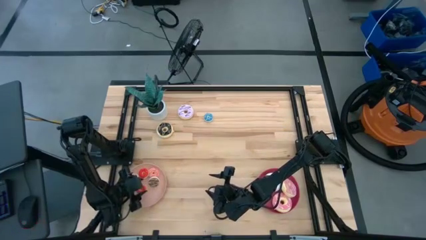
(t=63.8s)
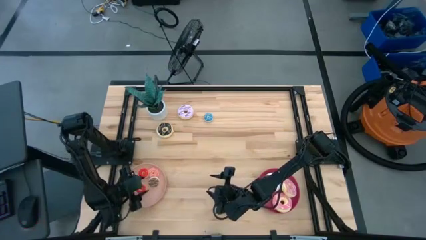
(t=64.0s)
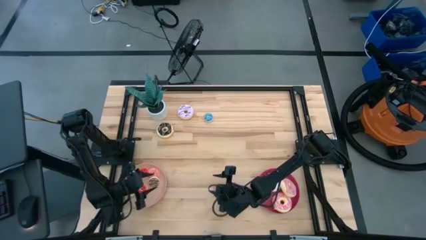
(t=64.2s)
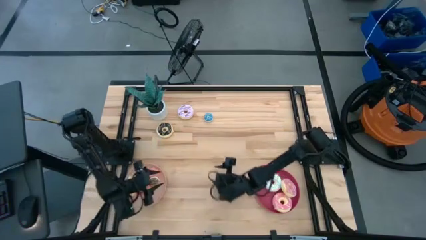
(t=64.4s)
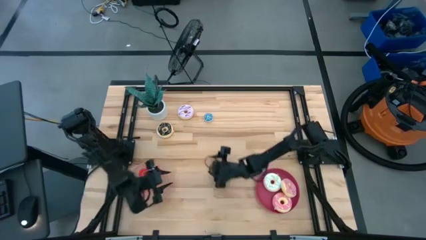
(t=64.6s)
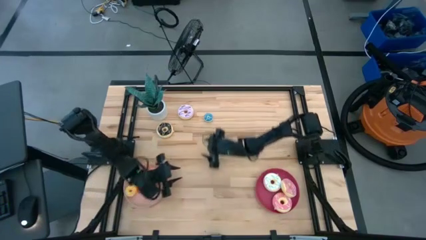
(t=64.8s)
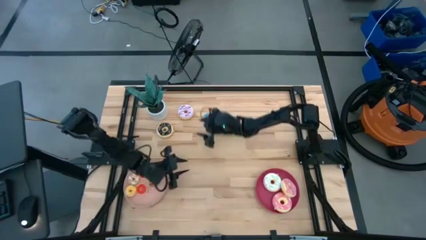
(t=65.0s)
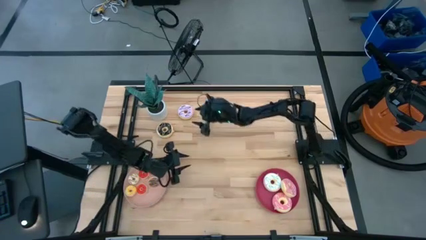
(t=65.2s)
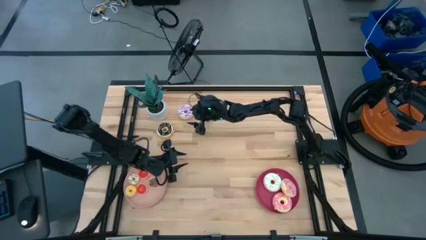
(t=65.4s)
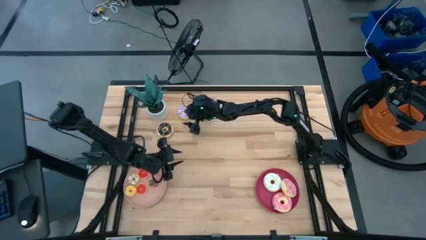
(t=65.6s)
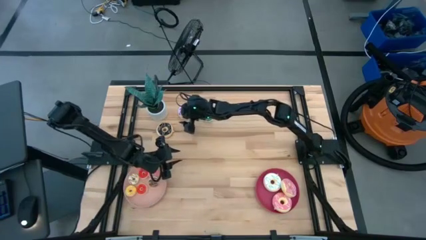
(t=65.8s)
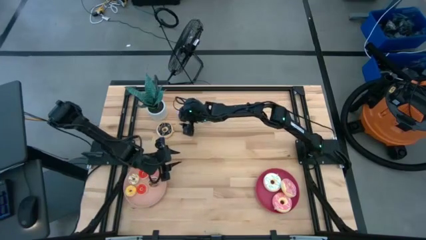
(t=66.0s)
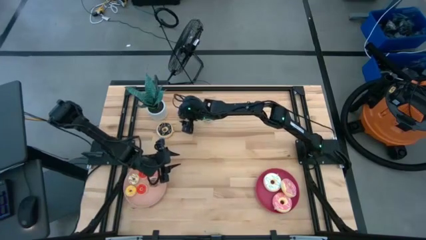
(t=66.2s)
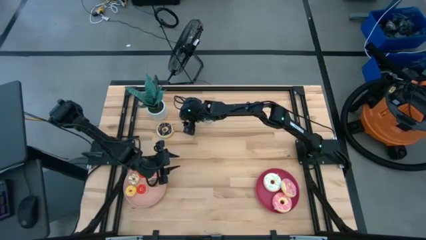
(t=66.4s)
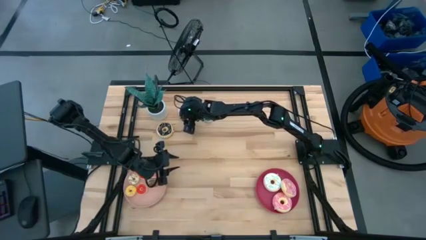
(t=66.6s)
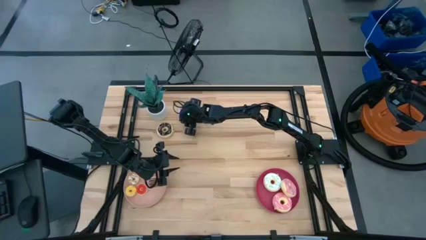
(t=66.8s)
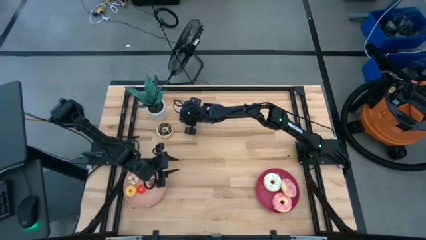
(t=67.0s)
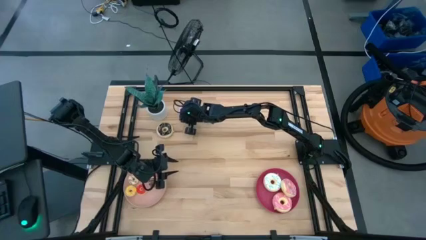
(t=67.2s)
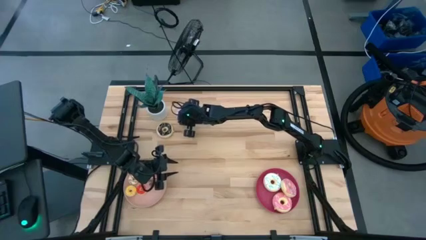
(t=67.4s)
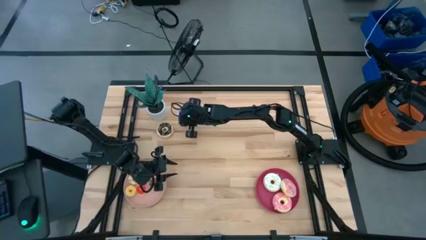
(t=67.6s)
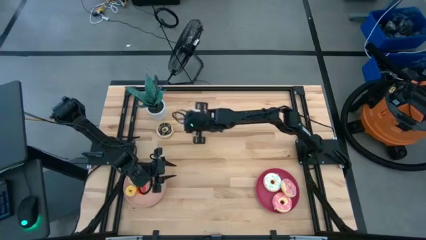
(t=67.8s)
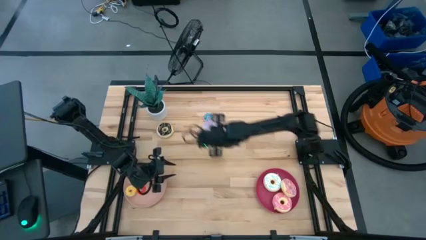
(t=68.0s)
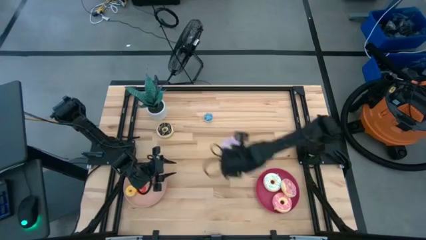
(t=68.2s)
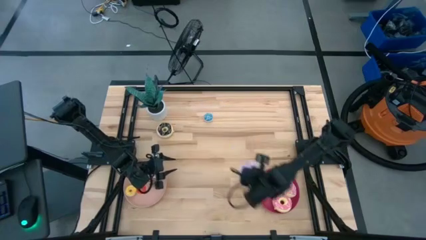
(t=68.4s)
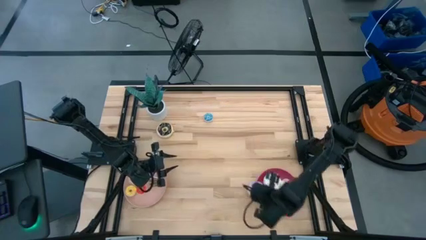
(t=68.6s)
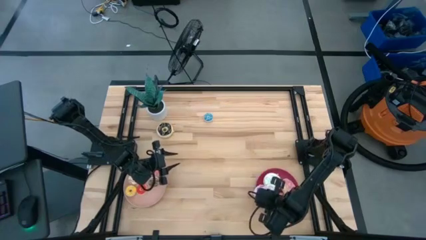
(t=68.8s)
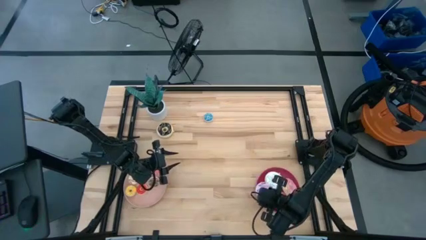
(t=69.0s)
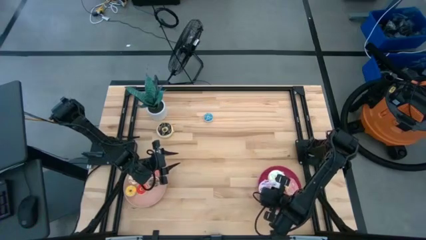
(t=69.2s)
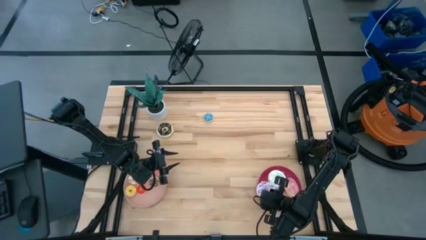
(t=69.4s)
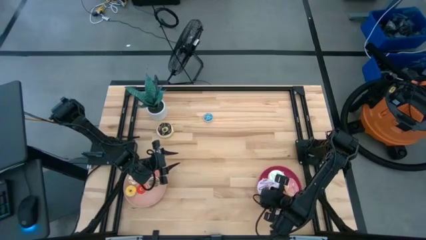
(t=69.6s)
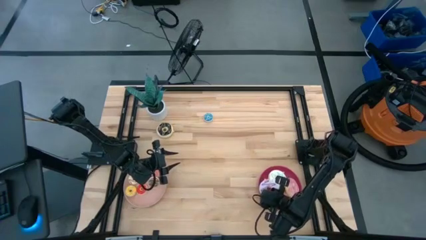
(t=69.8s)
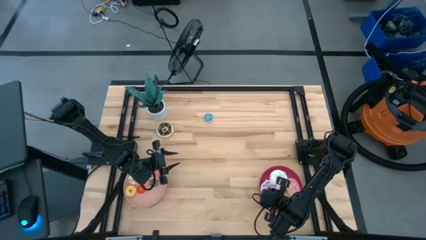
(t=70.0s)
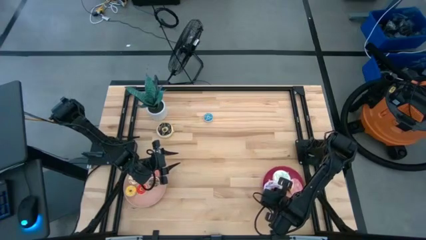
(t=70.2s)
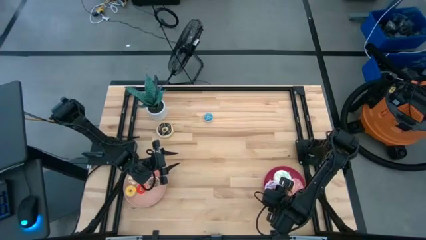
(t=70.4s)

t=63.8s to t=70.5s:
Task: Pick & Place donuts
Put the big purple donut on the dark pink plate

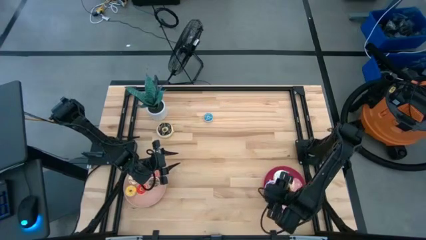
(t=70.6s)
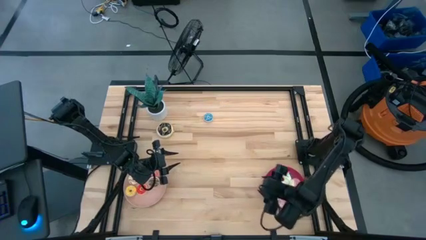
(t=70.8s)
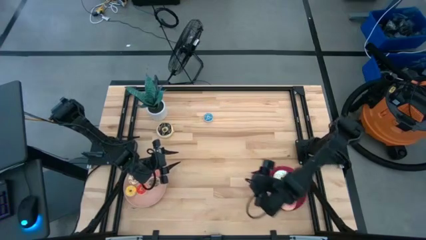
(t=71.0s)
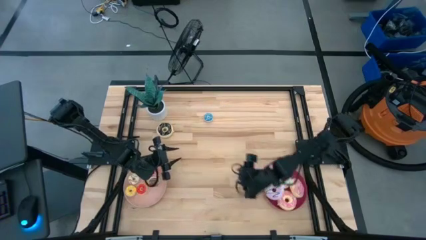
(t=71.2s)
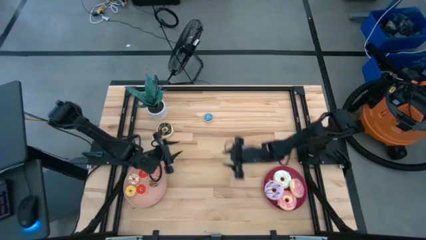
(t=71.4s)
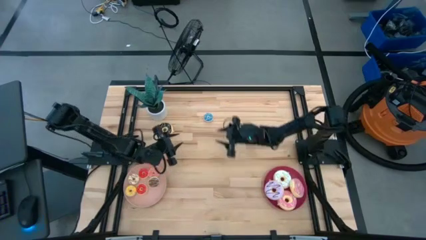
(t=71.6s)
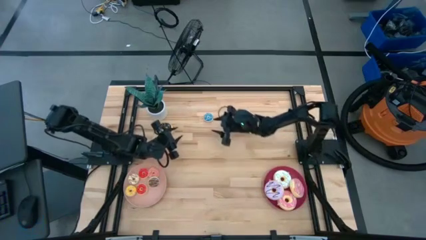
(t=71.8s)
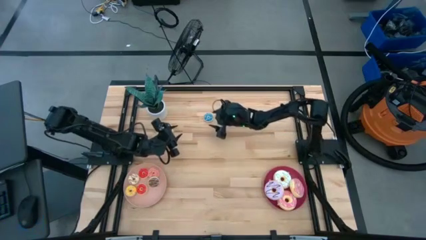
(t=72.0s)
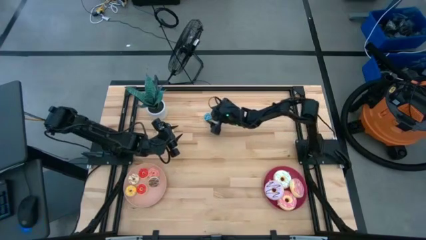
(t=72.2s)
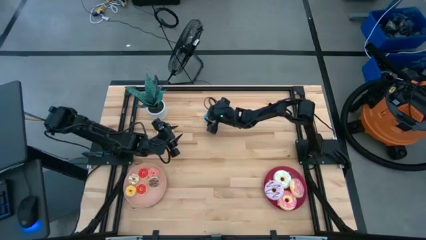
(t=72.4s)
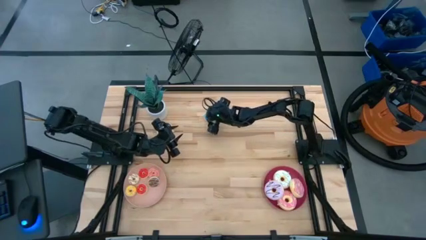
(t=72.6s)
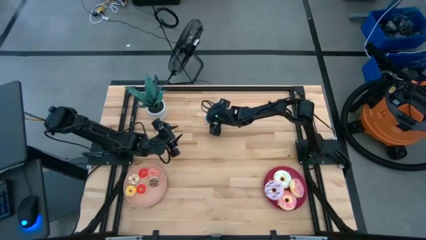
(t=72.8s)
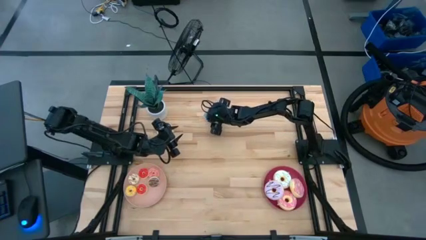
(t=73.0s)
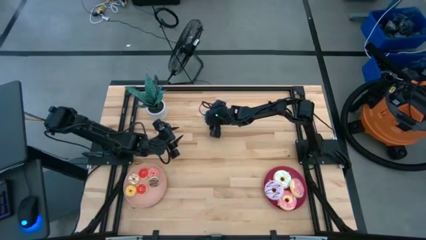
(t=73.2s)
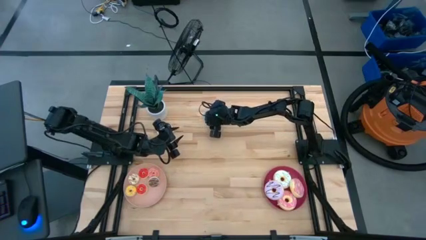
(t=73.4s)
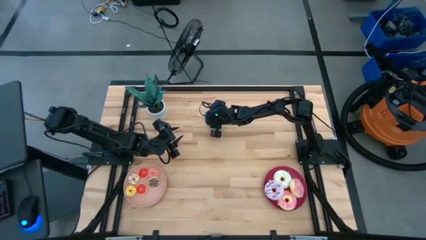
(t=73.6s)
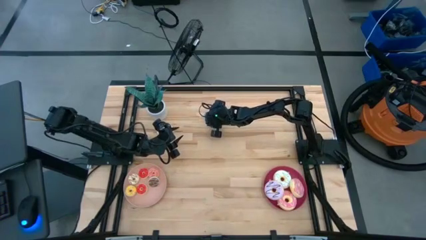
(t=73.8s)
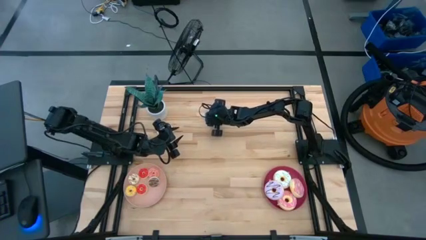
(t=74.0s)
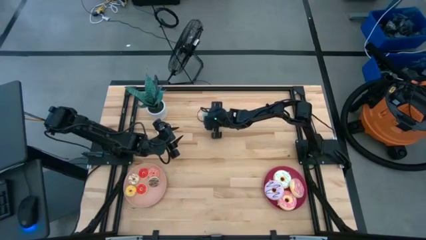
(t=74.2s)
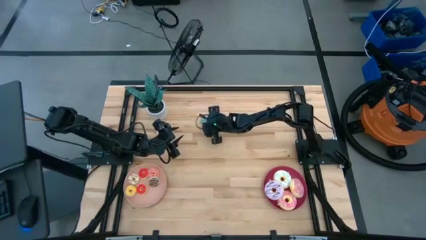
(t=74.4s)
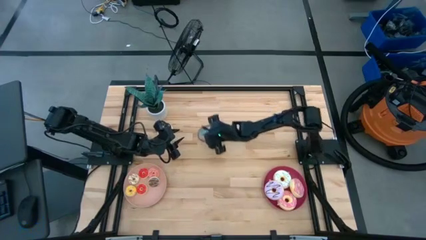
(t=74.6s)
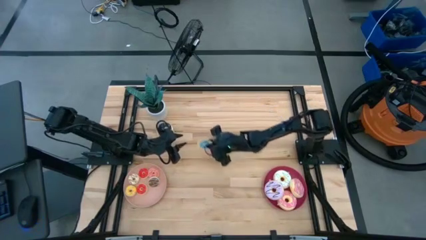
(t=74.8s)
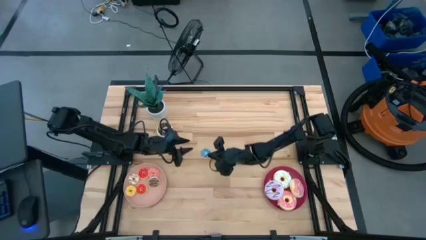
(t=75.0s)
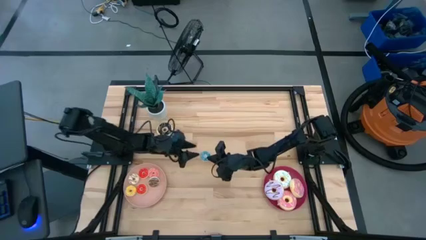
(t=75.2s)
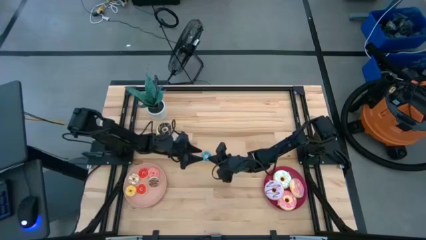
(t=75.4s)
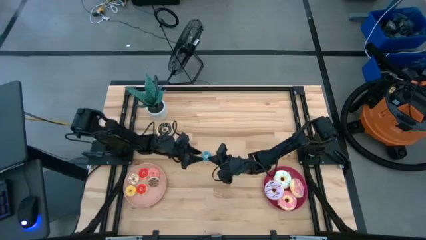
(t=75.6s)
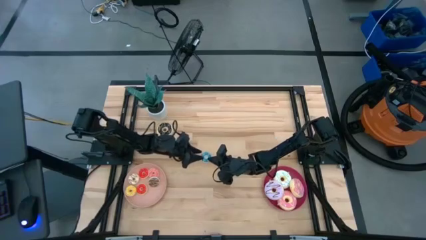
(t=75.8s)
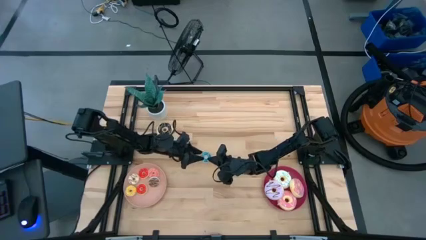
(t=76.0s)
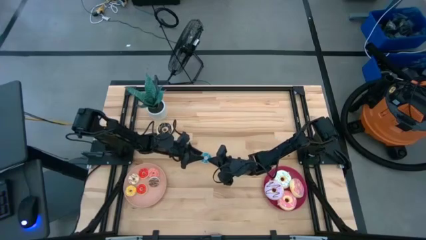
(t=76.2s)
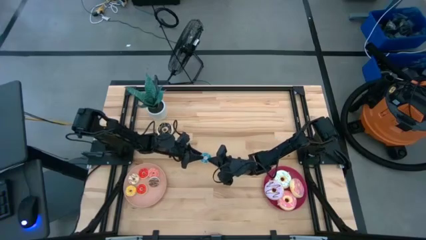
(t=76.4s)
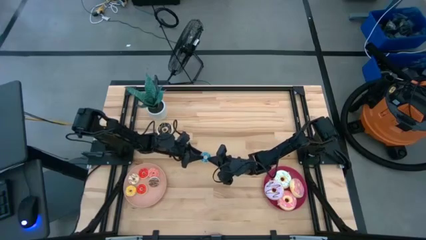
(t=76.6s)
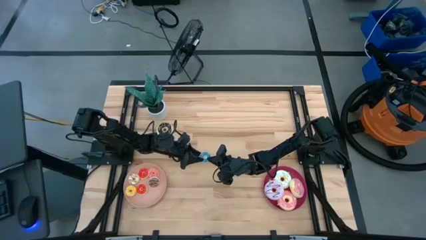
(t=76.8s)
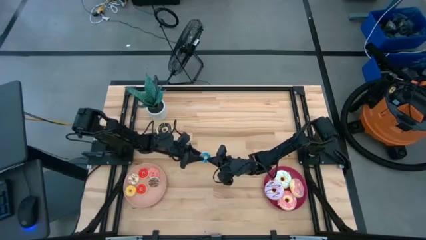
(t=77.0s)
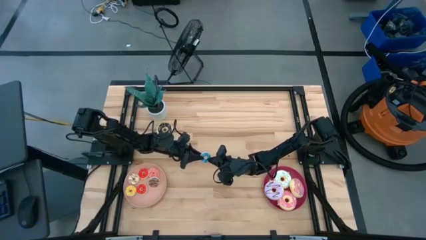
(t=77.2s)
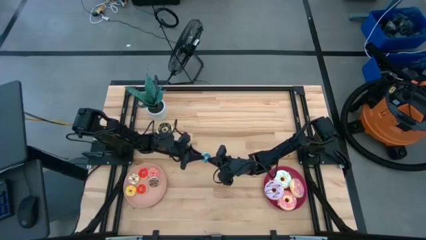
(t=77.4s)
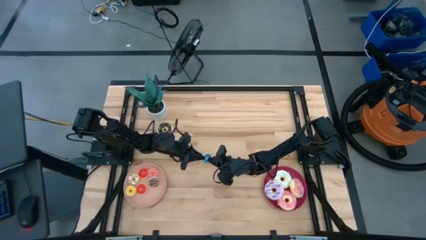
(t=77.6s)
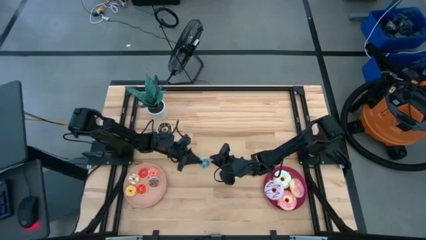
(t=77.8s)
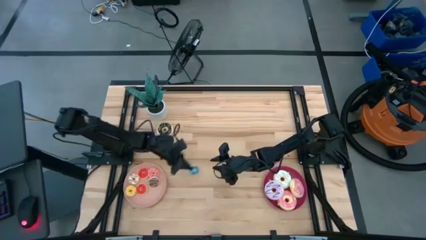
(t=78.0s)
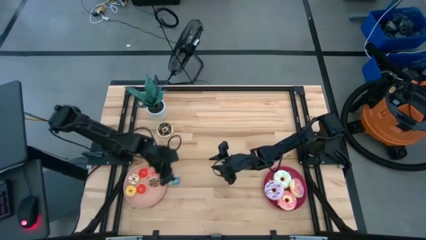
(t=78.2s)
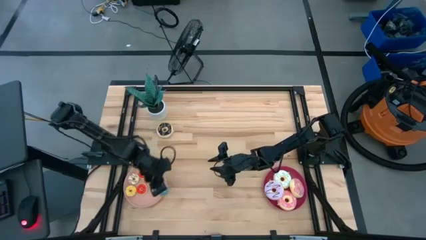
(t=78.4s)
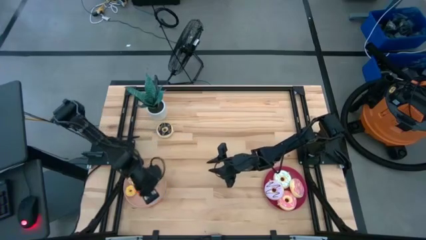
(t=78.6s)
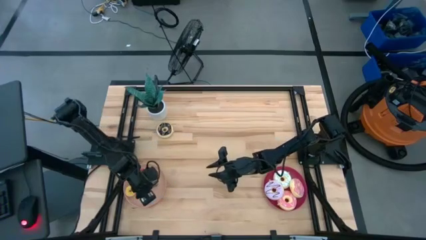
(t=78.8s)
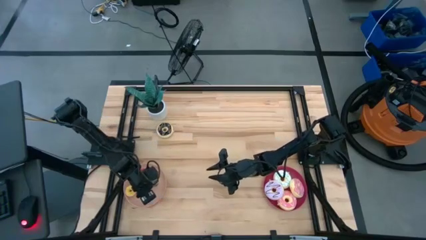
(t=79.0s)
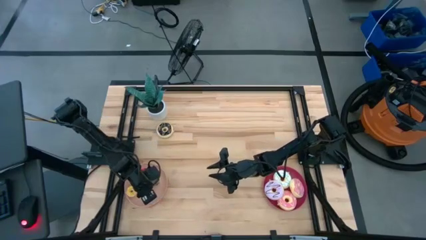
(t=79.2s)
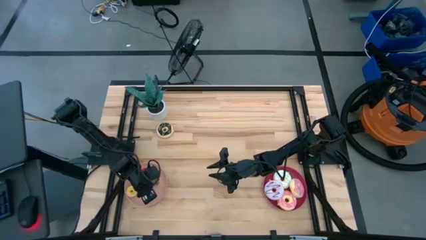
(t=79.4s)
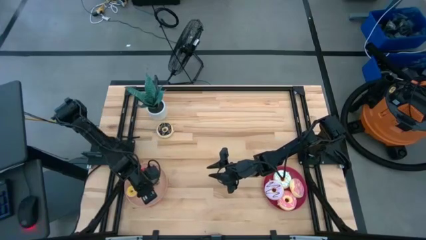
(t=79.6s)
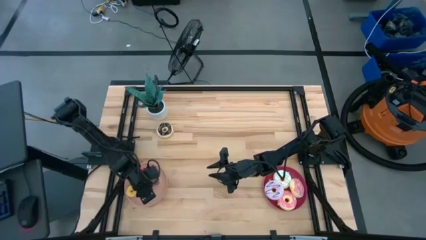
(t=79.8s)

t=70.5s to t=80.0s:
Put the small blue donut on the light pink plate

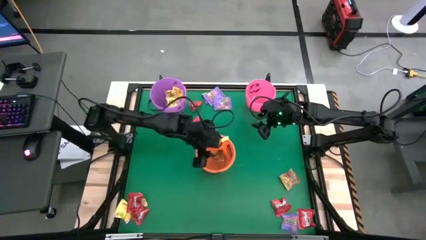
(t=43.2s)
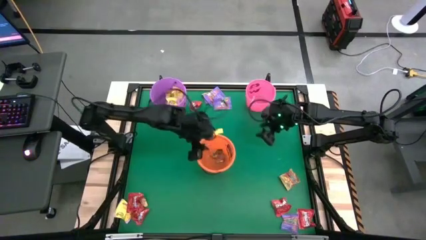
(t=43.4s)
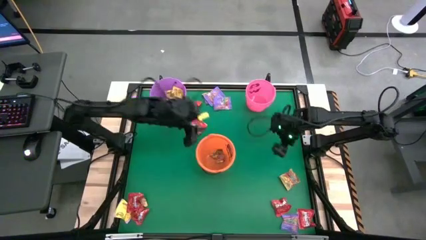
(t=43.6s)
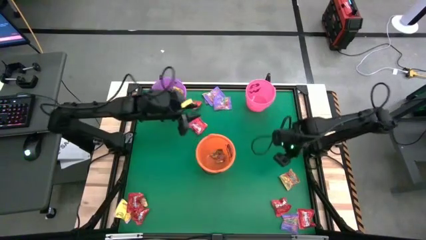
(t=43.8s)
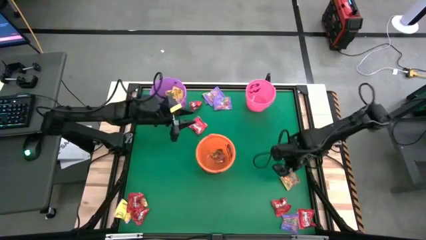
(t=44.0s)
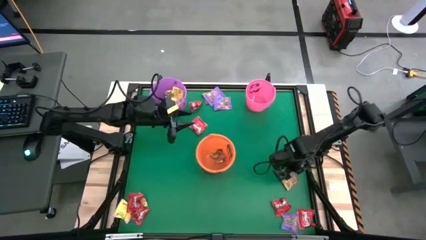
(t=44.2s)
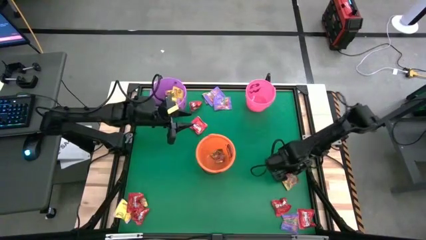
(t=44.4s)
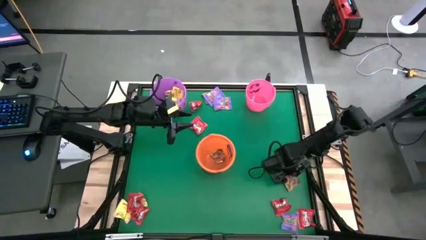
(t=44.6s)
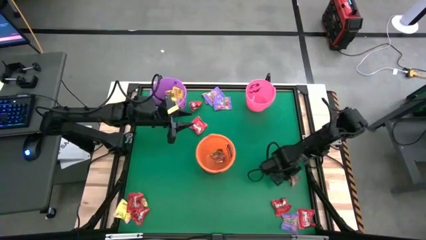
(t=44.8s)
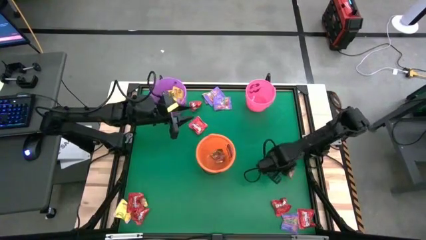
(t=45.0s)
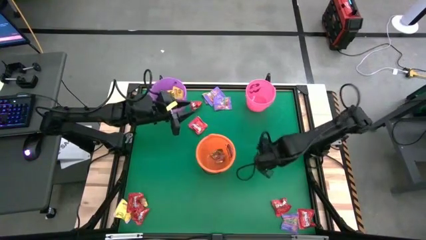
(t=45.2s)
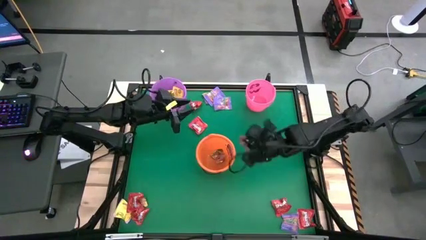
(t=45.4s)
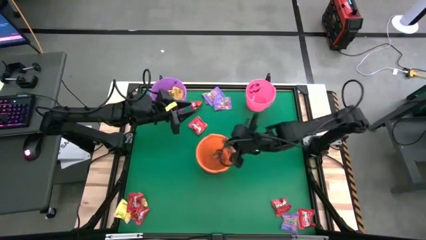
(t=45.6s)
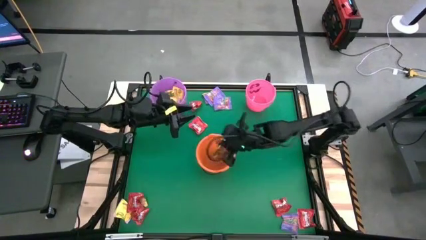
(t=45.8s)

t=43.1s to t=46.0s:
Task: Sort candy by brand, put in halloween buckets
Put the yellow-red candy into the orange bucket
